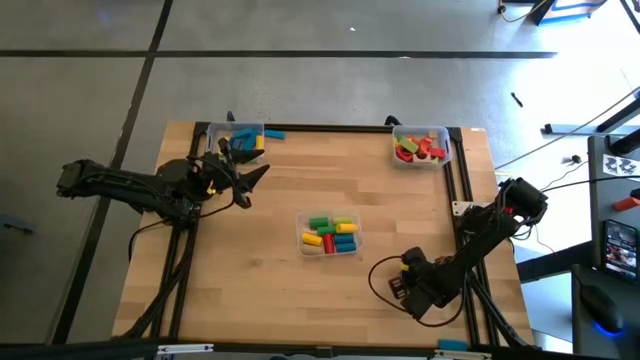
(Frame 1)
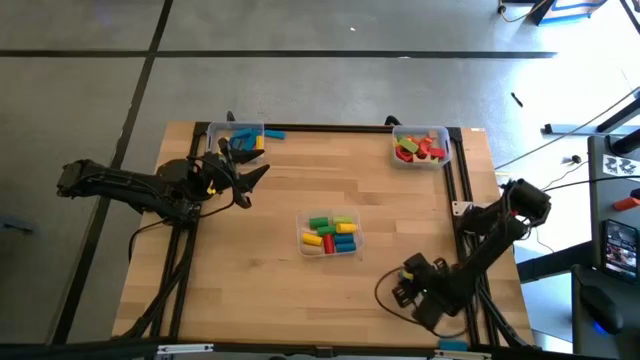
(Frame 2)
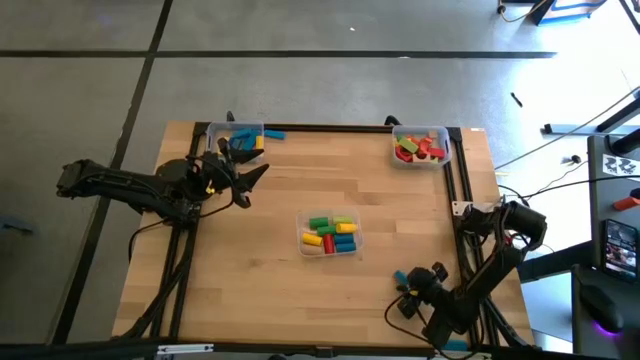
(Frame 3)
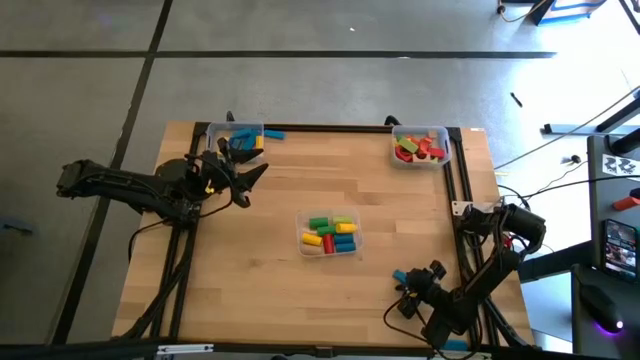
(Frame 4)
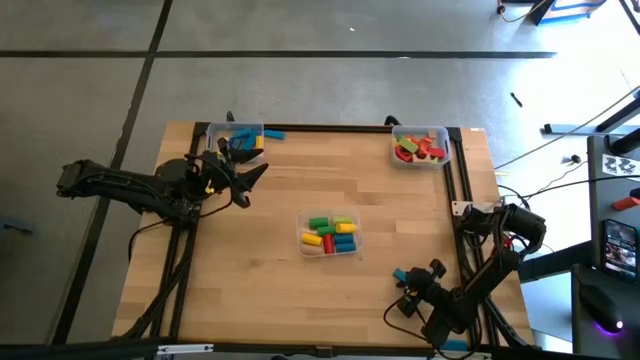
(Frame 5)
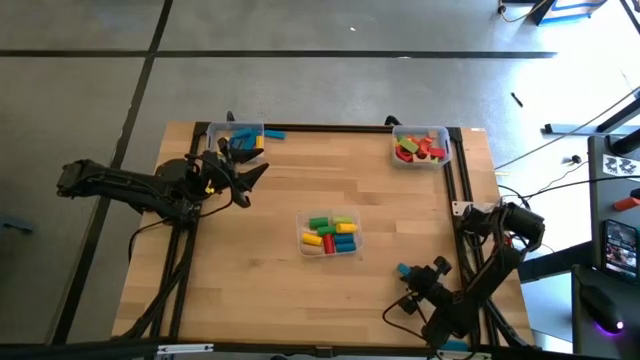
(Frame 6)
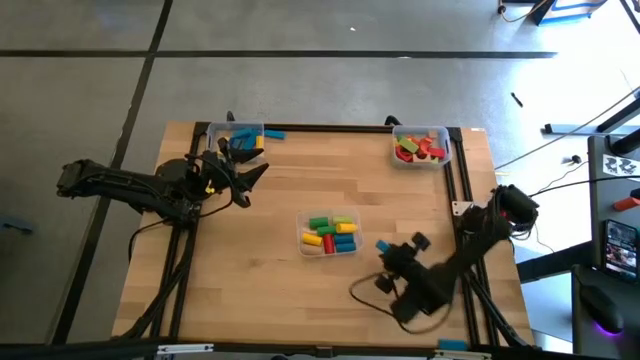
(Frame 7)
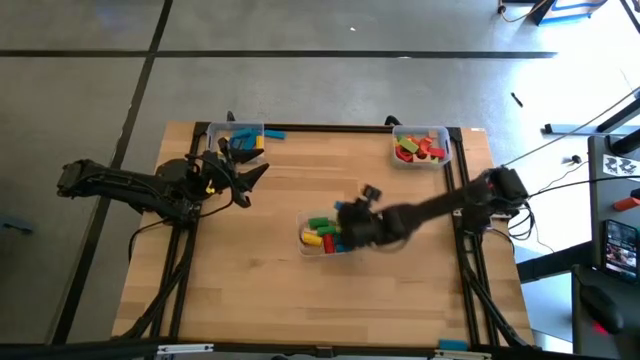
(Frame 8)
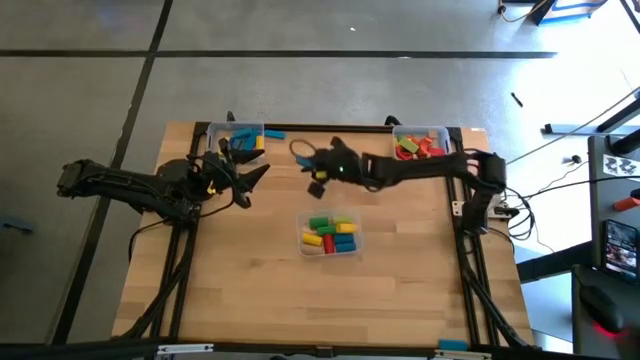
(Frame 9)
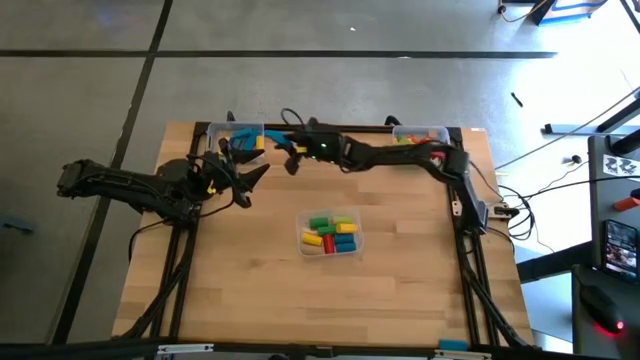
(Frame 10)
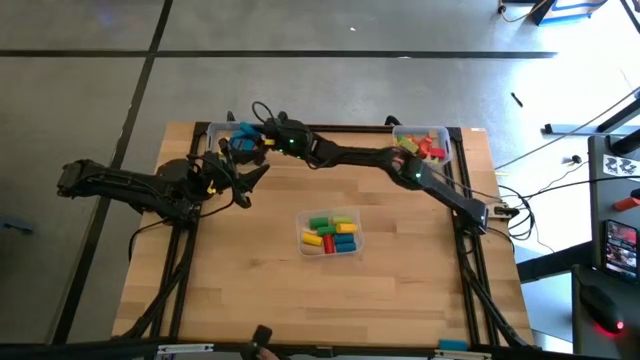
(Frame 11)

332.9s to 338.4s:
Task: Sort blocks by size
Put the blue rectangular block into the top left transparent bin

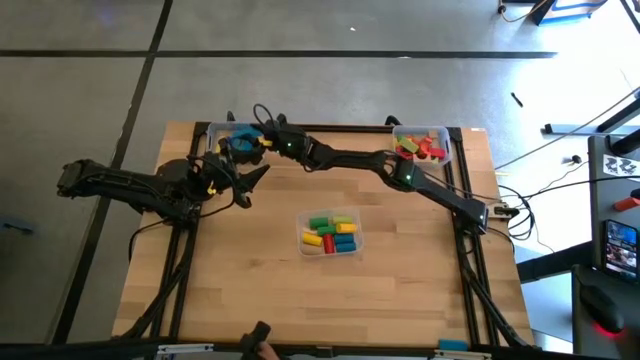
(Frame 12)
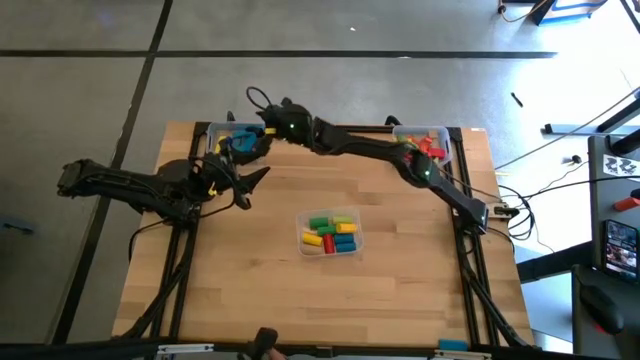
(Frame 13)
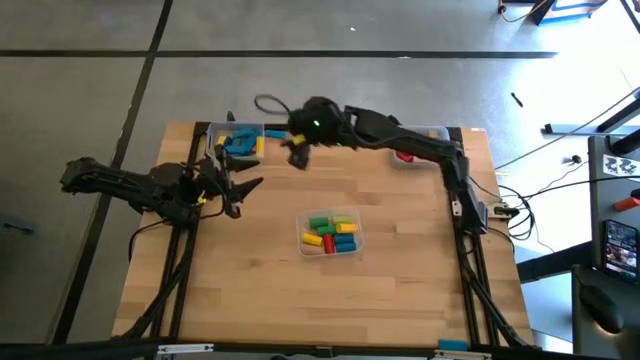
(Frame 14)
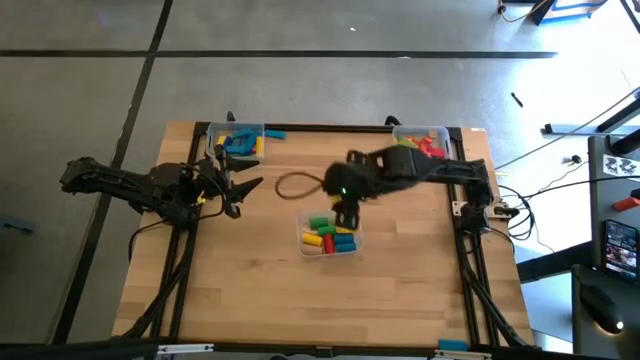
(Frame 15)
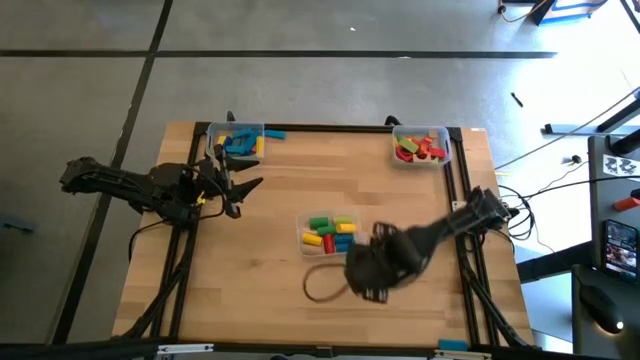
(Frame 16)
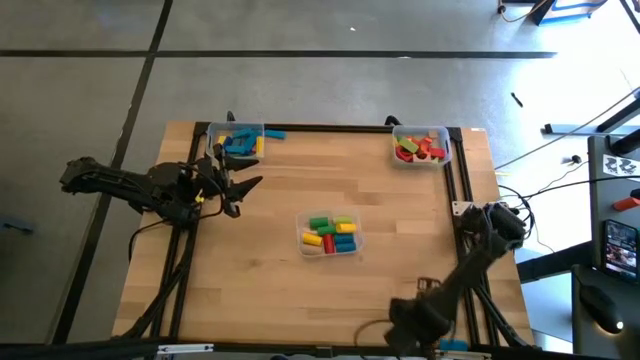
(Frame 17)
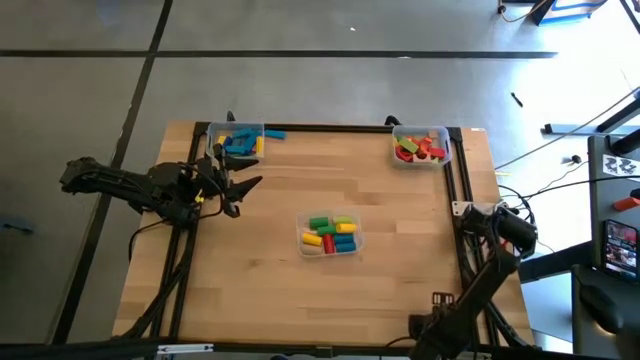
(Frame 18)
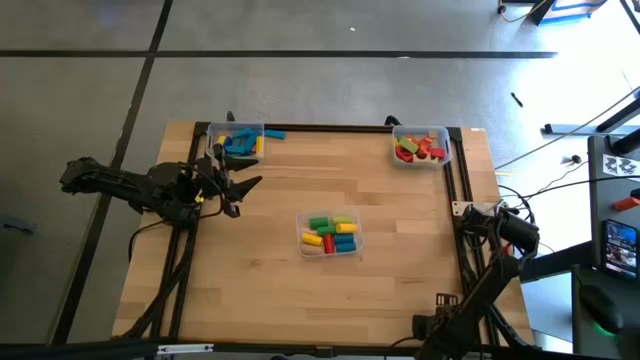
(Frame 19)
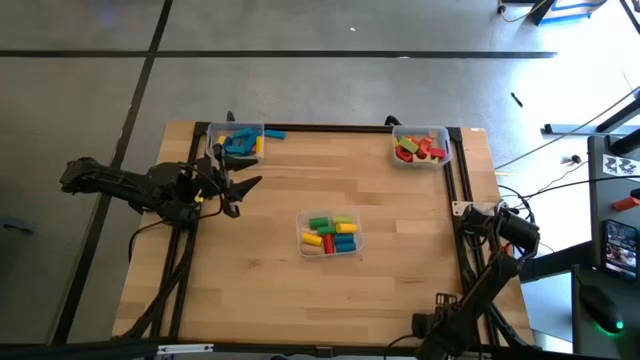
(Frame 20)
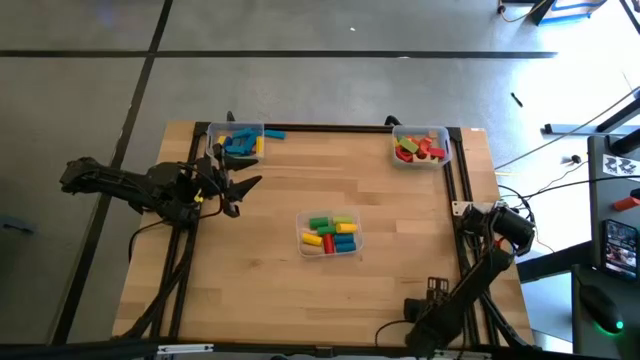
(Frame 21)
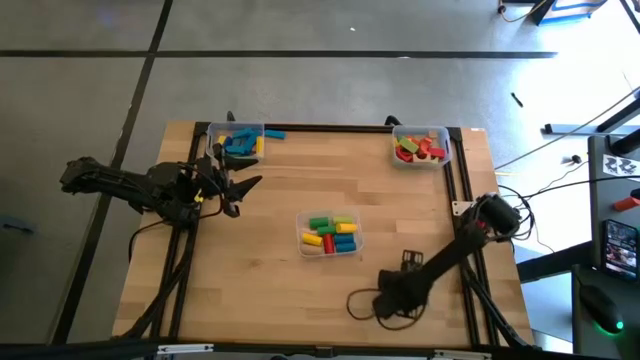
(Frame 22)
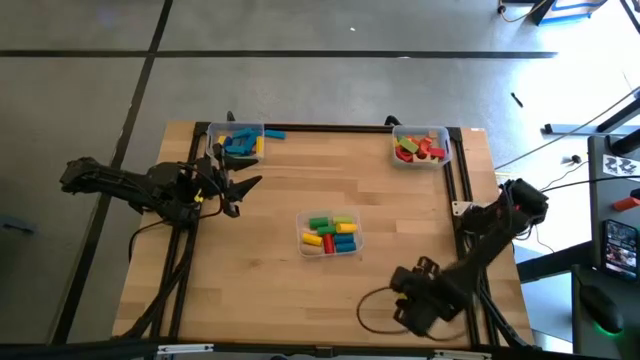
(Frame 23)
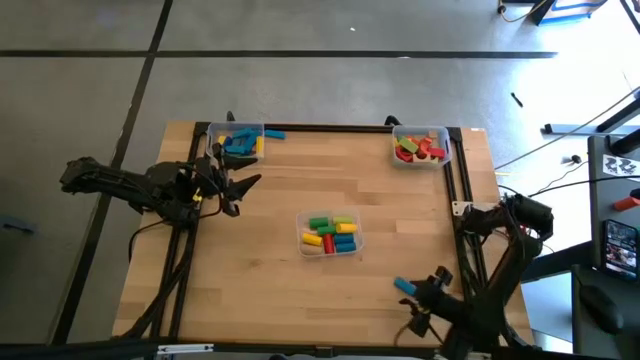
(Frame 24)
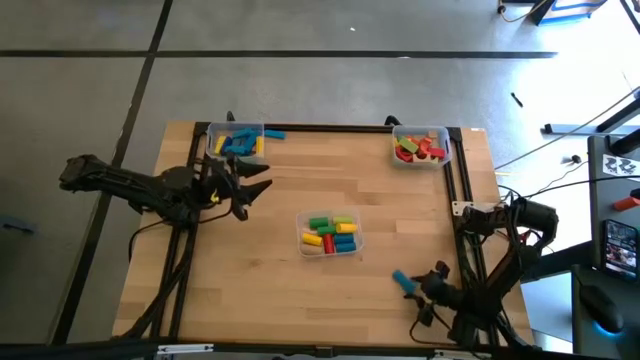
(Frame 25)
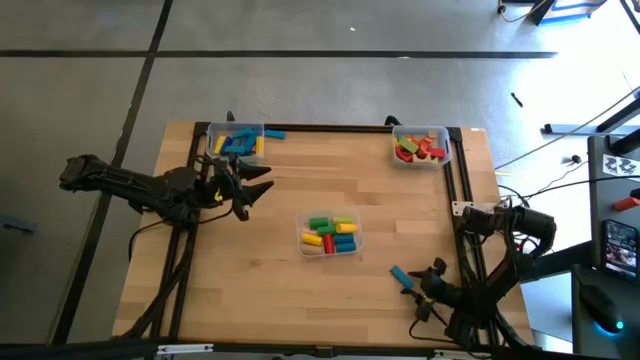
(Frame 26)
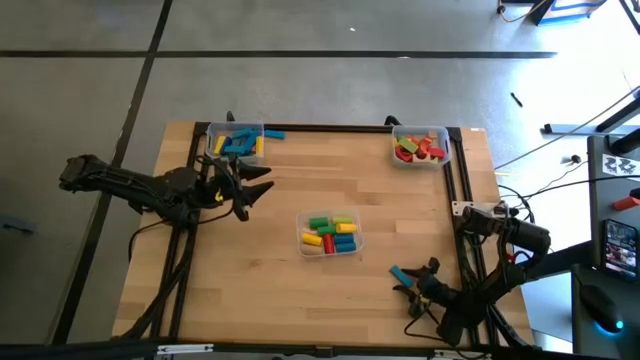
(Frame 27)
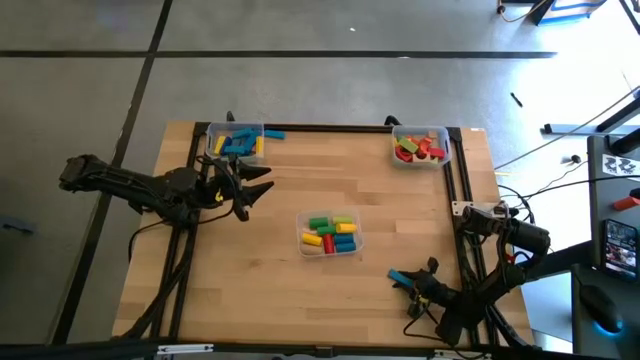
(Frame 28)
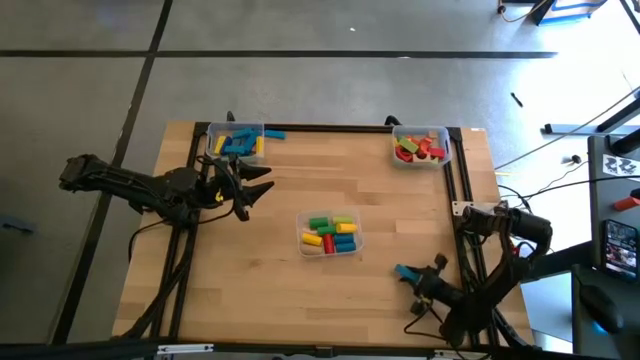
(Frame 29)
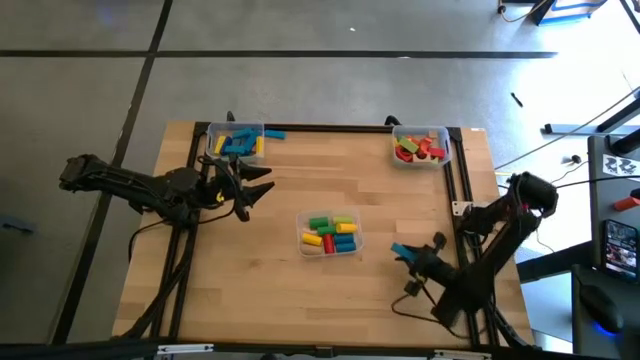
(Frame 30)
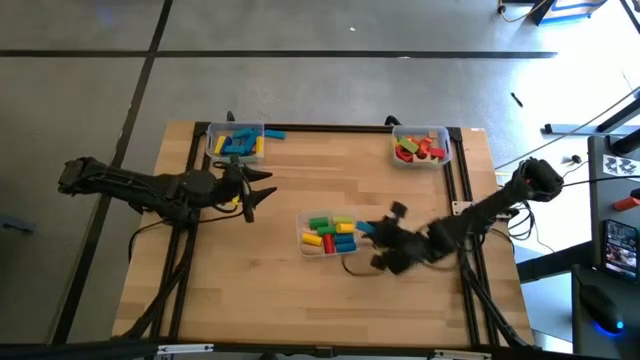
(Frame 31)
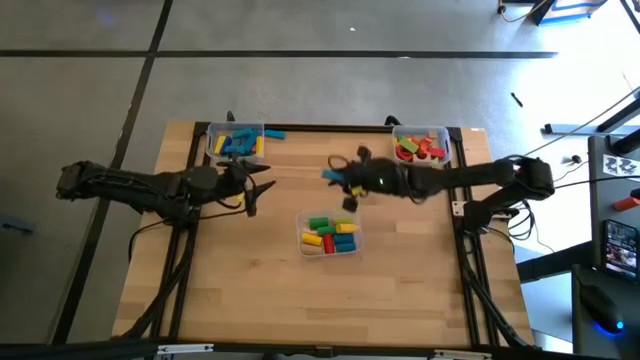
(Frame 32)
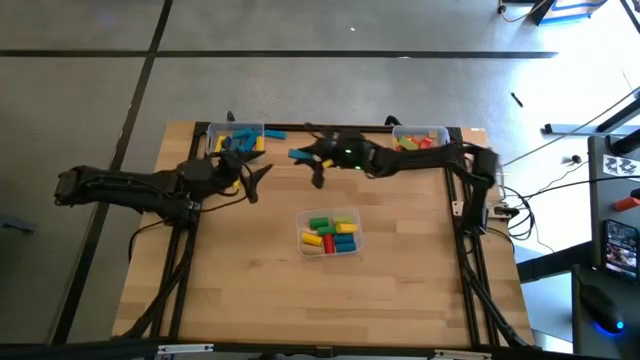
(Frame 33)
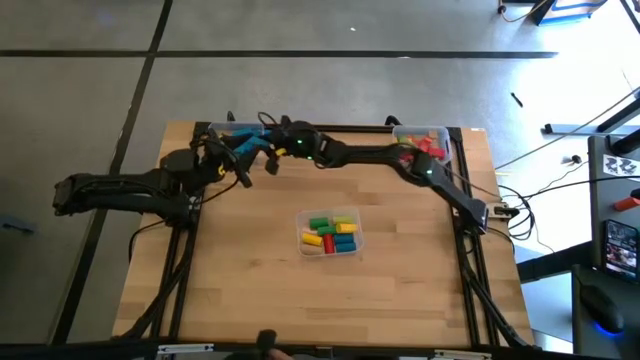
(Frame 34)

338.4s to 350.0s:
Put the blue rectangular block into the top left transparent bin

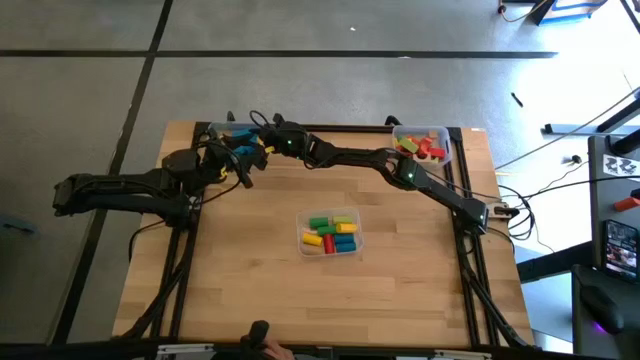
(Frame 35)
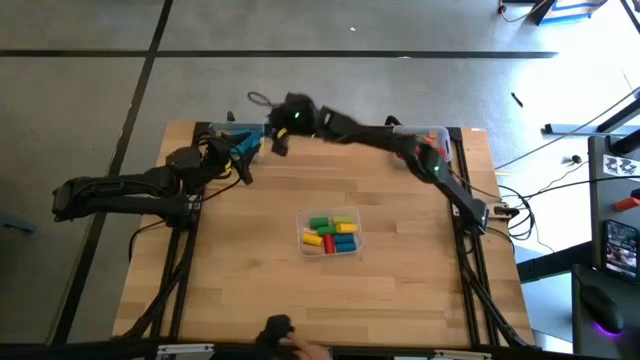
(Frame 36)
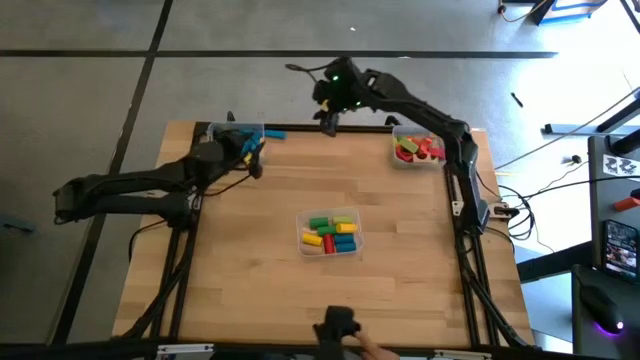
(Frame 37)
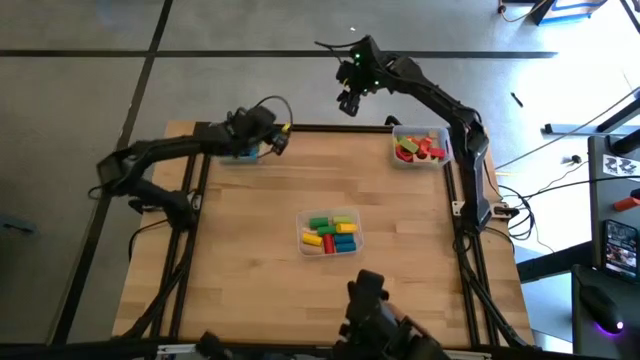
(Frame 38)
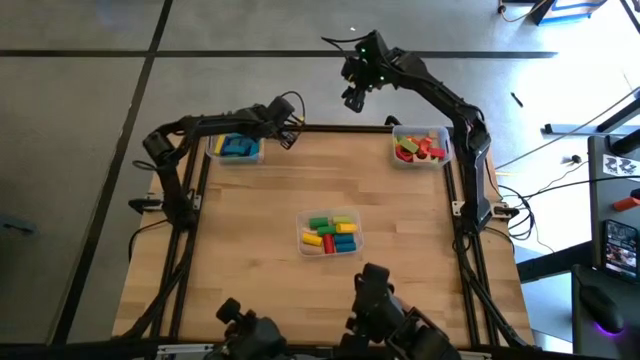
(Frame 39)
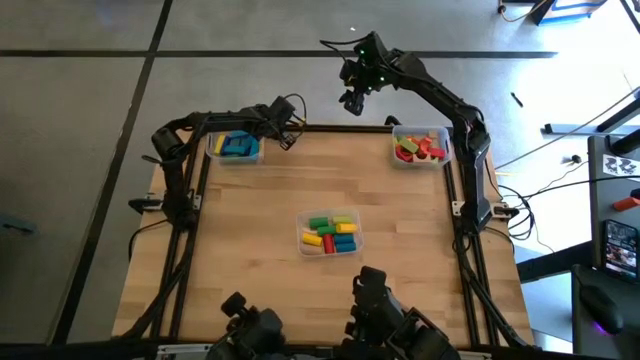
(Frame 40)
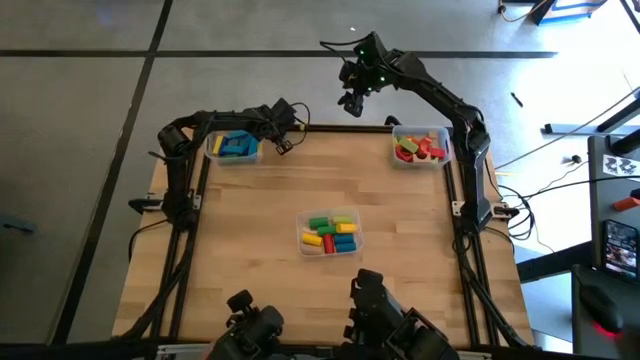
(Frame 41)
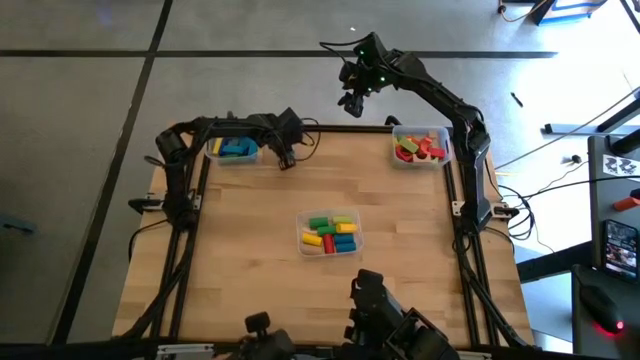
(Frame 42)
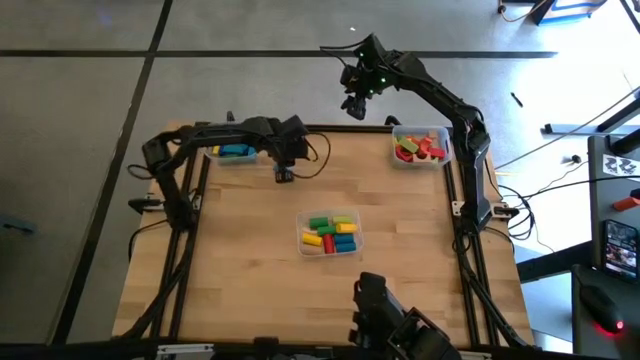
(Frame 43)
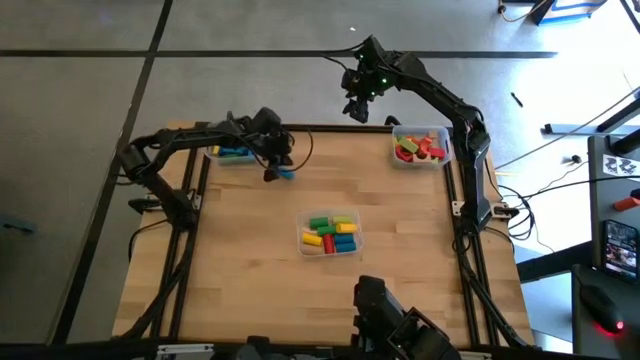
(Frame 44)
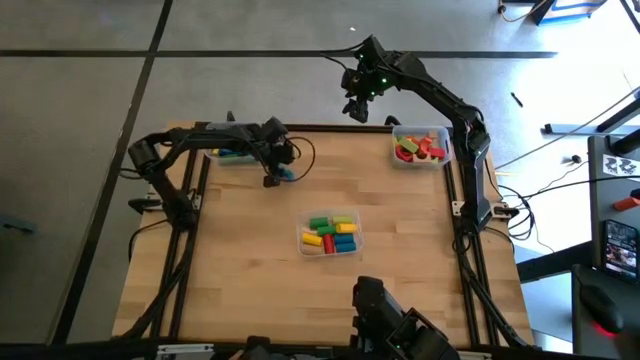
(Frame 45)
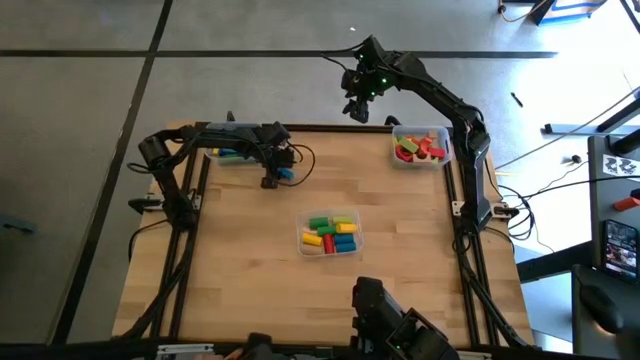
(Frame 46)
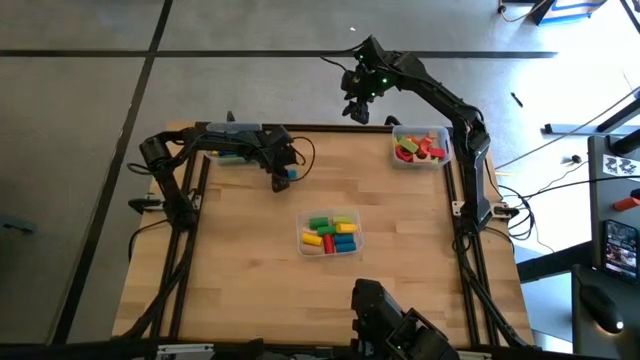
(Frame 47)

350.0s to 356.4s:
Put the blue rectangular block into the top left transparent bin
